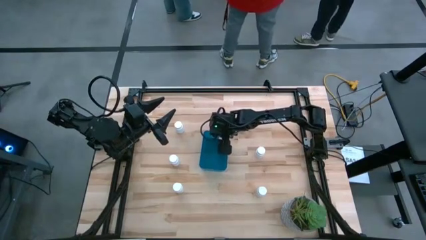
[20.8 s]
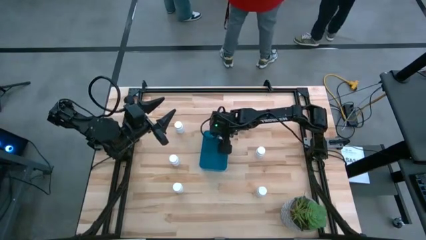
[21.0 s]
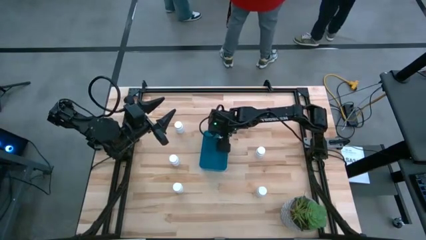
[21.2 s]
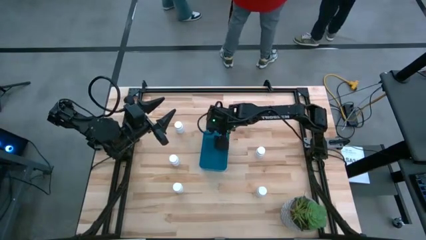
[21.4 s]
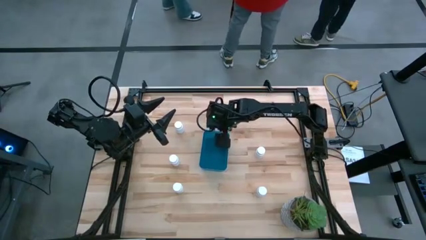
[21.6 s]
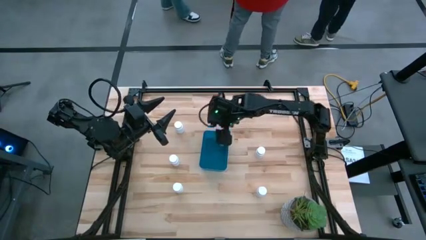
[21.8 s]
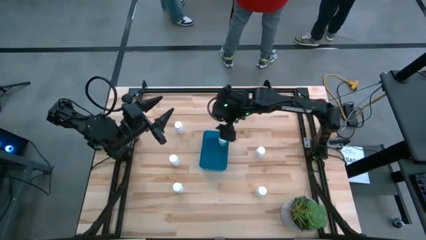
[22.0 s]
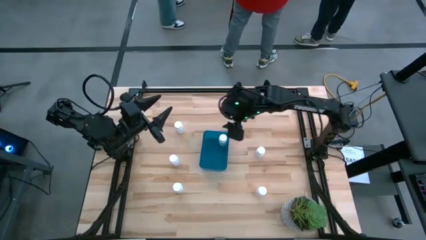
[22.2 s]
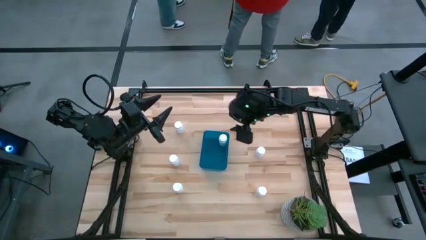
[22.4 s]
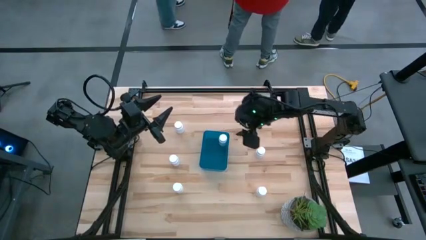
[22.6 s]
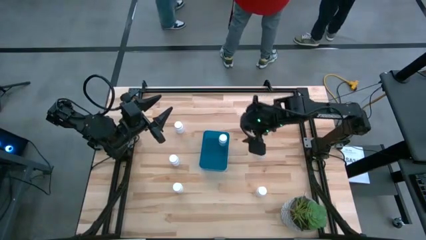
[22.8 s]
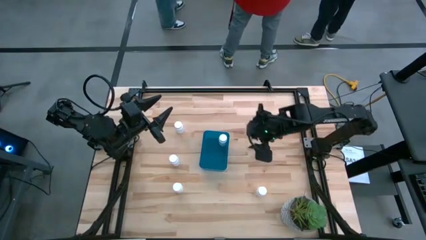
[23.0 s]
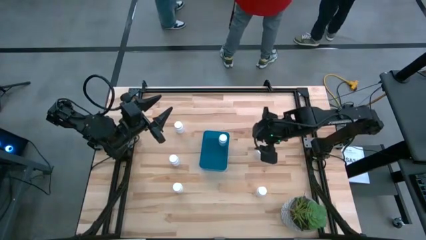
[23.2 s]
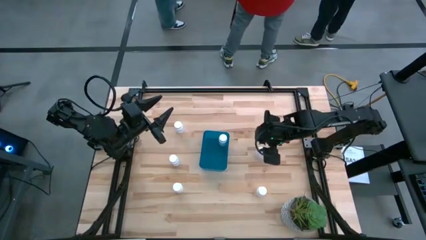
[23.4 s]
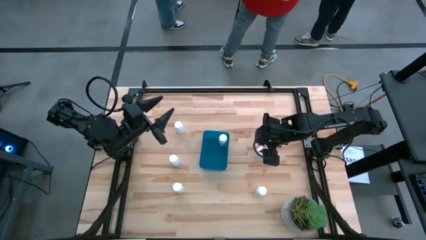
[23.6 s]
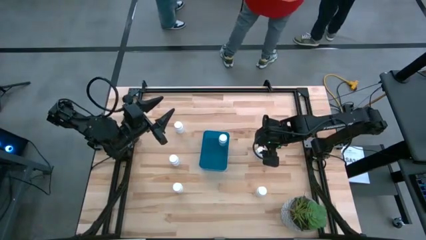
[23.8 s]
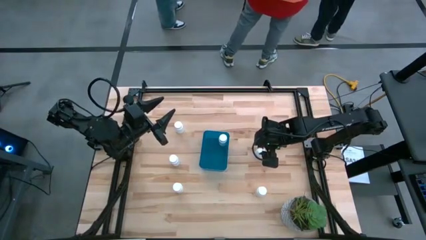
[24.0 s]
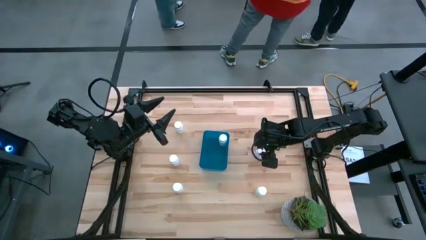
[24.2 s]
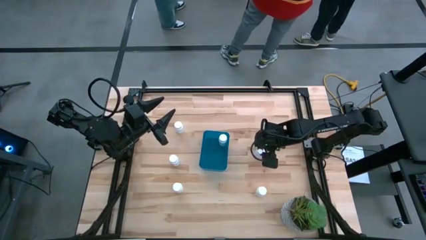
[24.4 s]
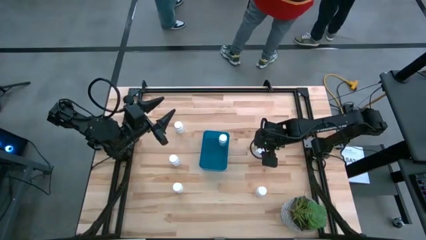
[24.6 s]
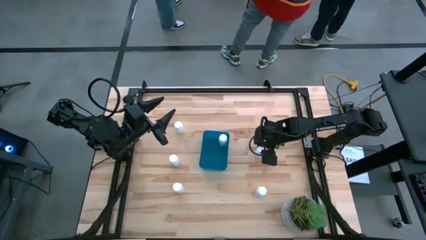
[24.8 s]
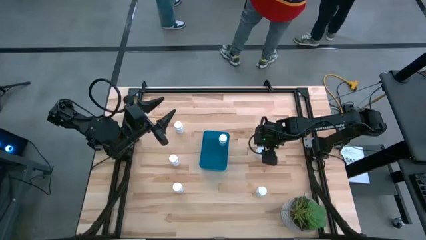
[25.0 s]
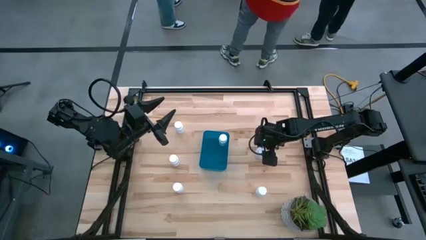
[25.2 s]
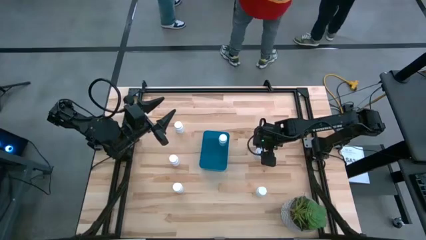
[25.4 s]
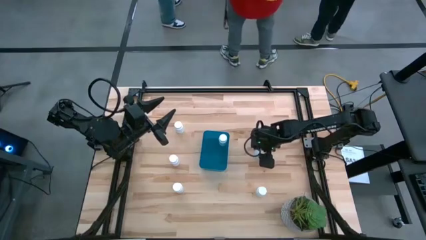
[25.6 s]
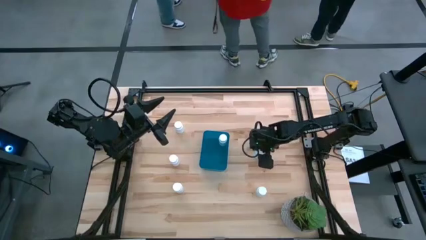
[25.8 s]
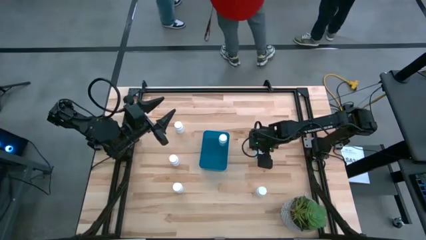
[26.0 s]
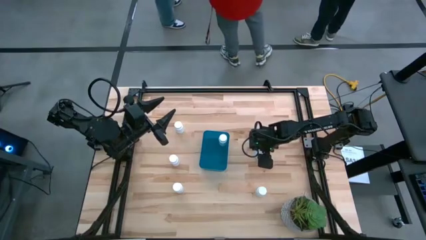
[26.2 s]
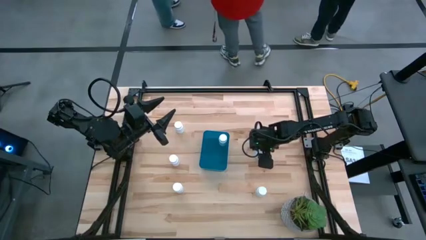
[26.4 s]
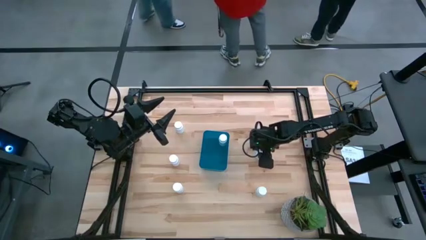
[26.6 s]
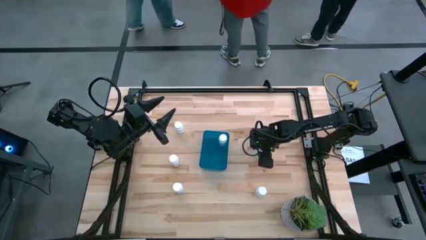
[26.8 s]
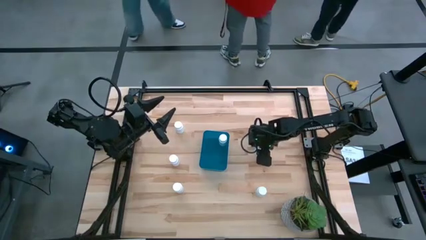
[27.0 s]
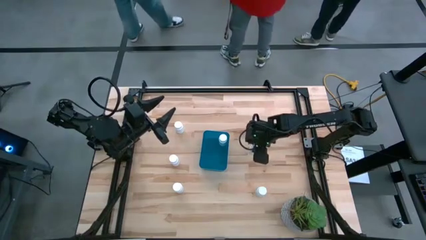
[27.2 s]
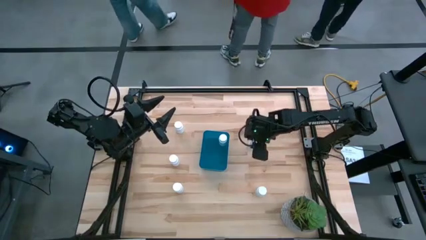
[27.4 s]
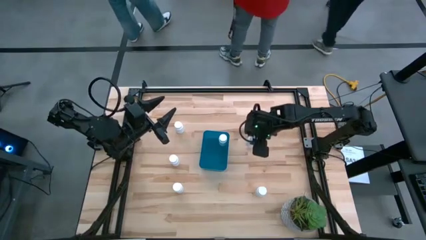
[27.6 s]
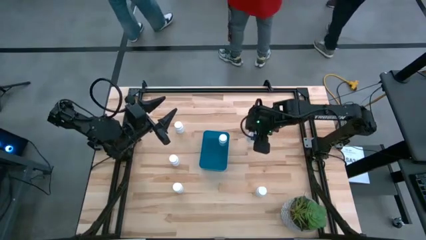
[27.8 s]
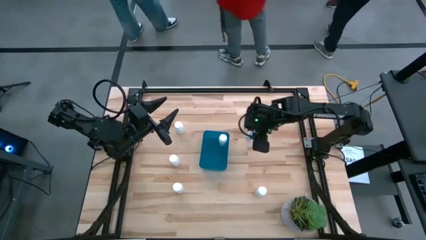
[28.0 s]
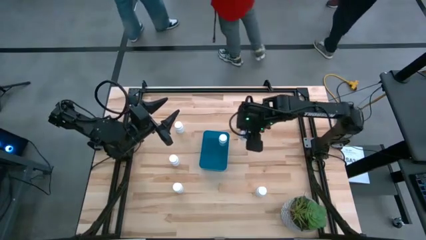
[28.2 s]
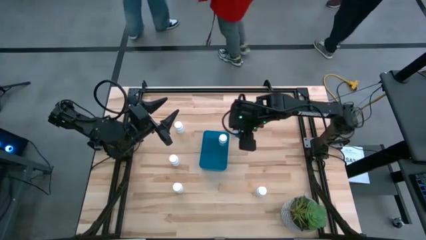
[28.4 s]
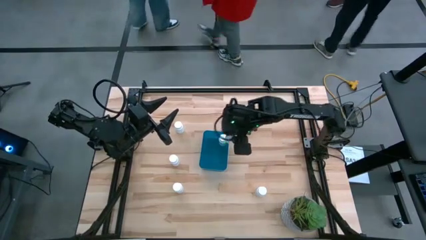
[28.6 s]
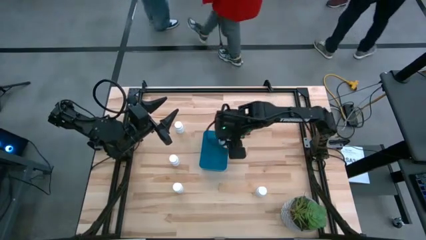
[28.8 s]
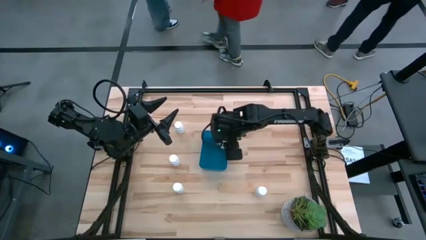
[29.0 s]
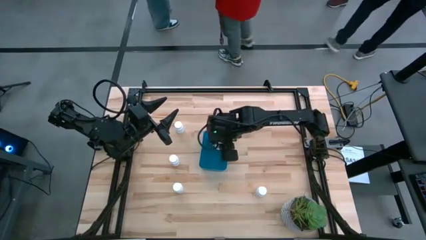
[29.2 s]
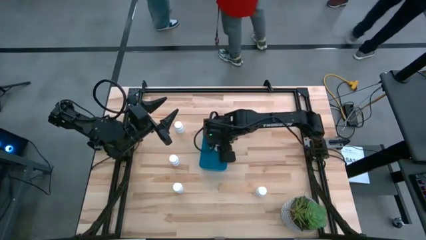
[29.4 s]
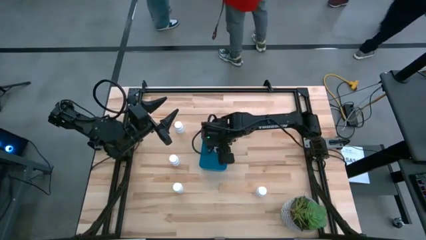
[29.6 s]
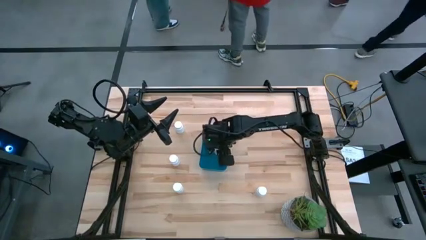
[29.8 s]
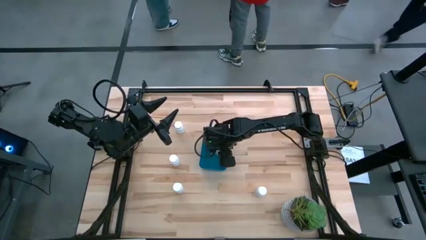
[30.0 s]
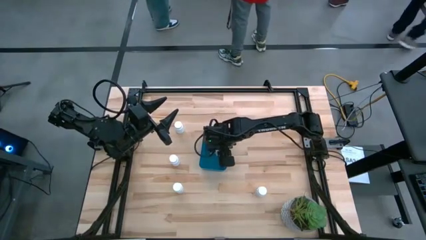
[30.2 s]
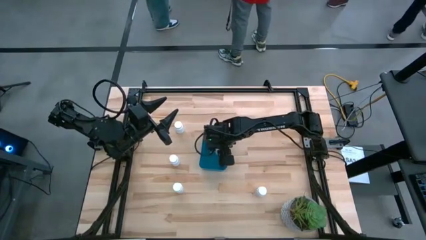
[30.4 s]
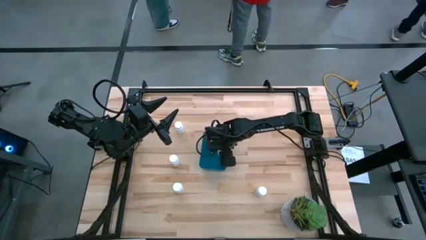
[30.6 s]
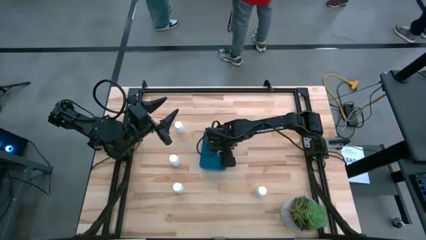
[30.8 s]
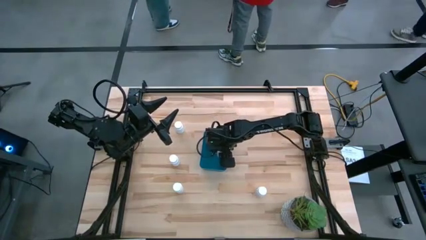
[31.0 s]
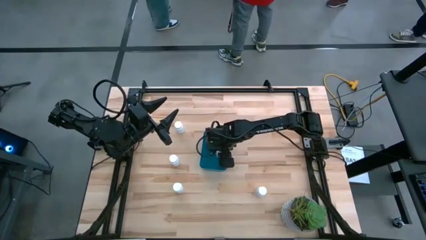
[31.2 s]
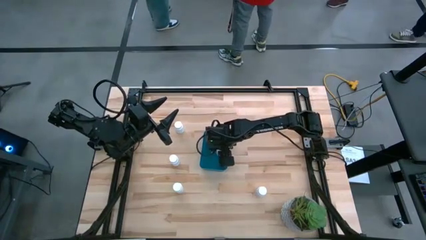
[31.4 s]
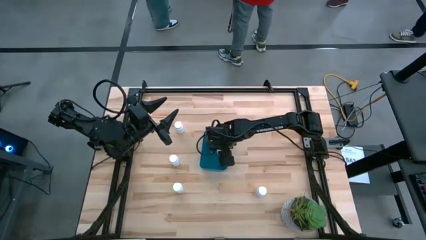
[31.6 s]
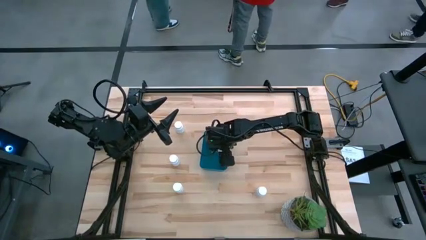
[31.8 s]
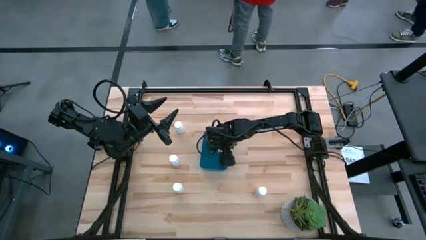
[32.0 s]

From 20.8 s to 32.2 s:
Task: Pick and place pill bottles into a basket
Put the white medicine bottle into the container

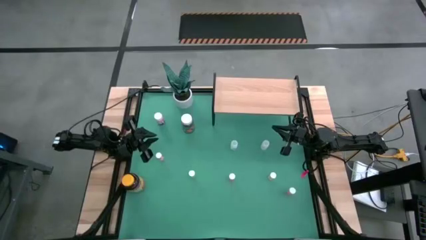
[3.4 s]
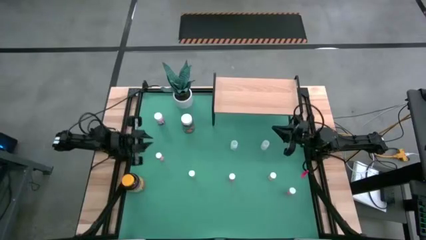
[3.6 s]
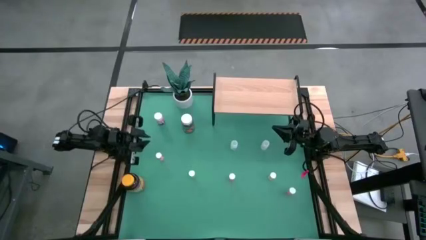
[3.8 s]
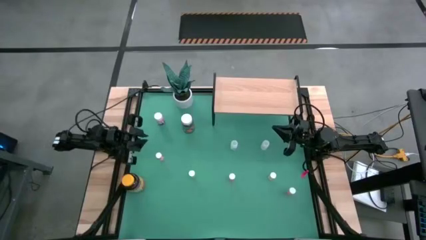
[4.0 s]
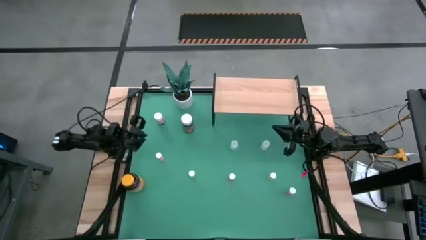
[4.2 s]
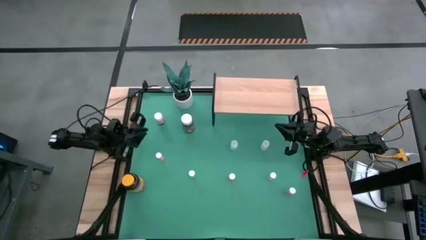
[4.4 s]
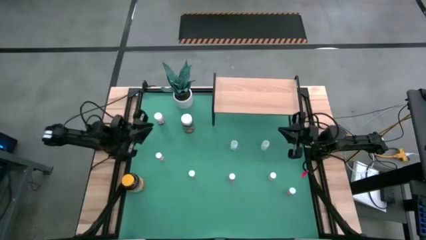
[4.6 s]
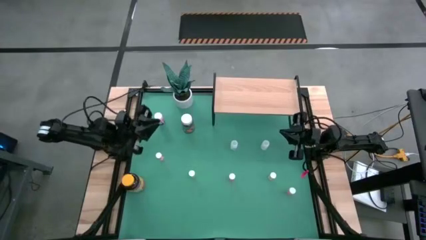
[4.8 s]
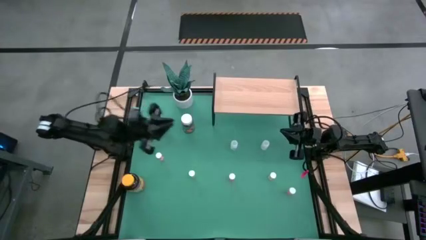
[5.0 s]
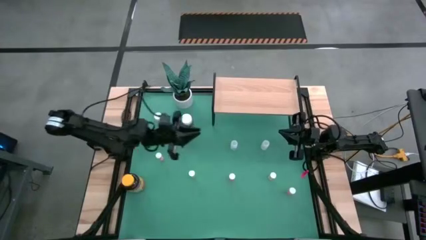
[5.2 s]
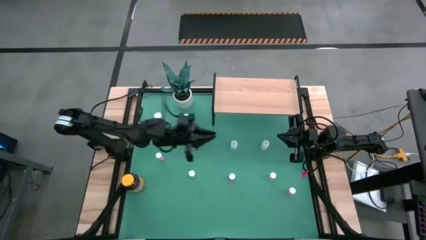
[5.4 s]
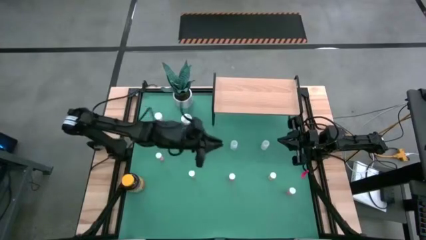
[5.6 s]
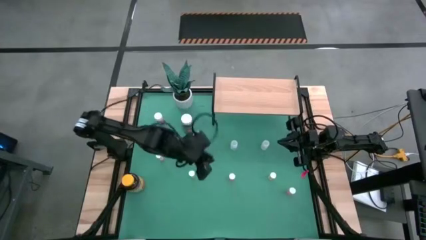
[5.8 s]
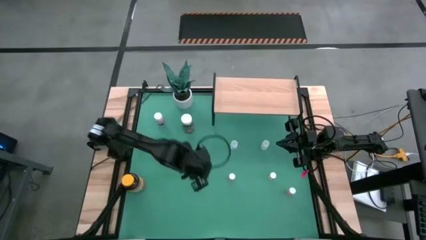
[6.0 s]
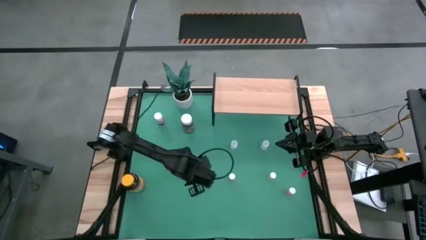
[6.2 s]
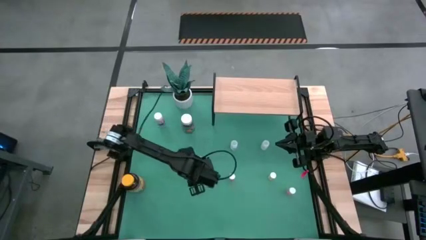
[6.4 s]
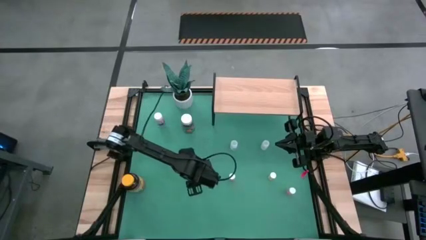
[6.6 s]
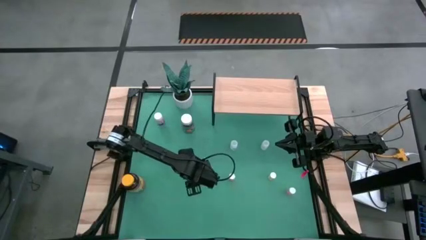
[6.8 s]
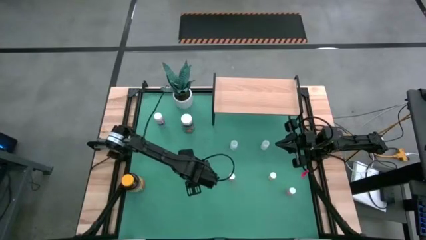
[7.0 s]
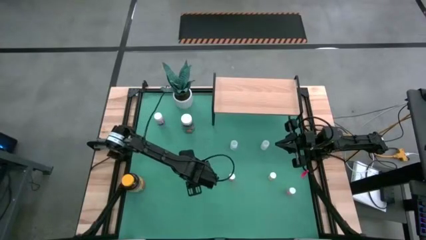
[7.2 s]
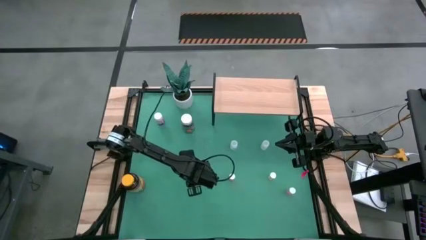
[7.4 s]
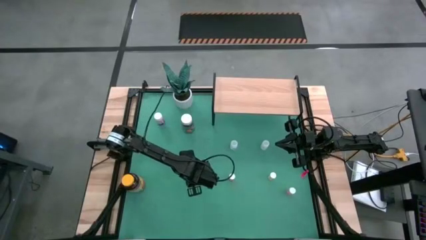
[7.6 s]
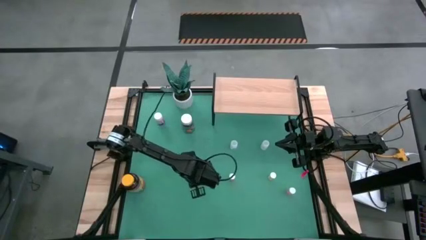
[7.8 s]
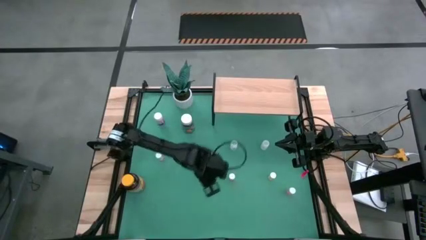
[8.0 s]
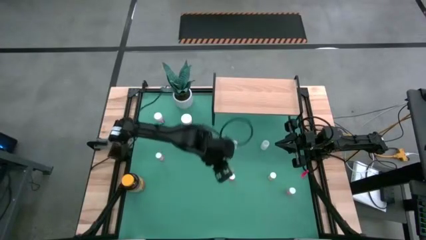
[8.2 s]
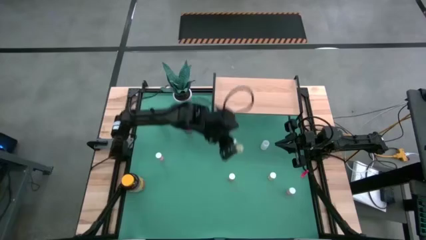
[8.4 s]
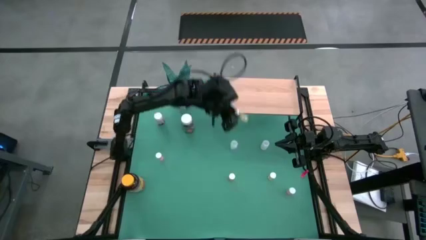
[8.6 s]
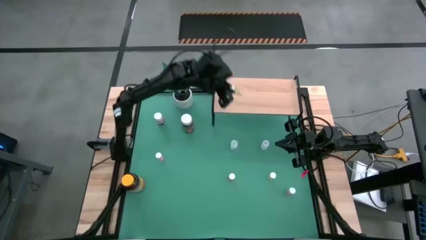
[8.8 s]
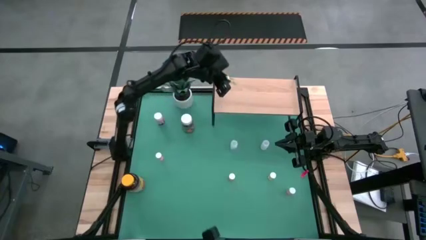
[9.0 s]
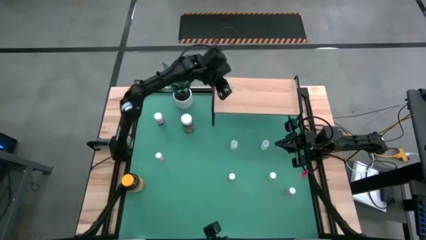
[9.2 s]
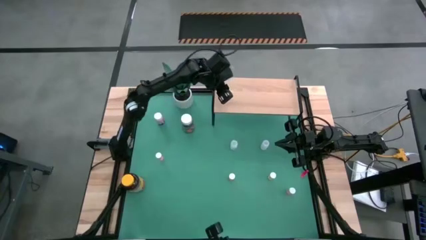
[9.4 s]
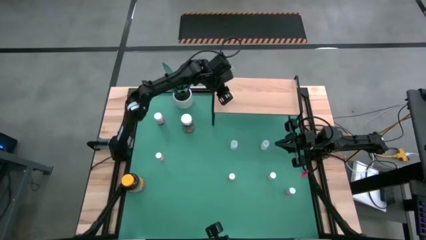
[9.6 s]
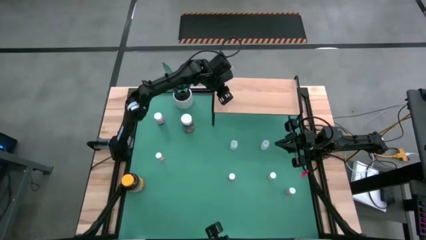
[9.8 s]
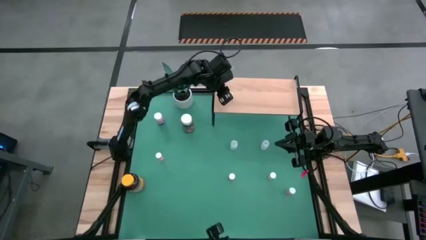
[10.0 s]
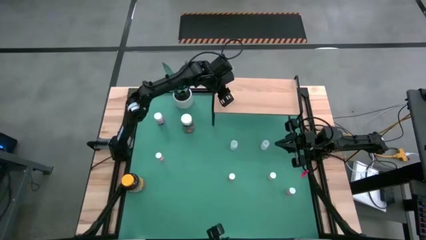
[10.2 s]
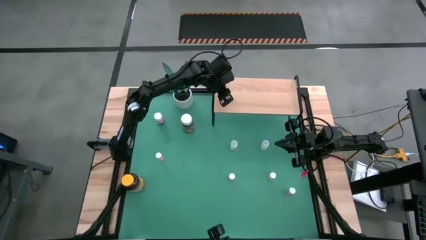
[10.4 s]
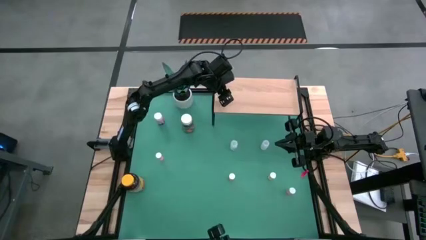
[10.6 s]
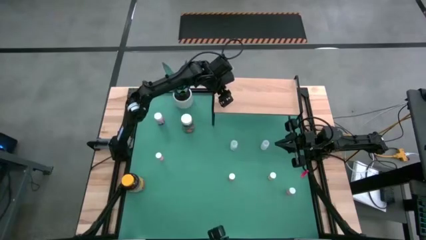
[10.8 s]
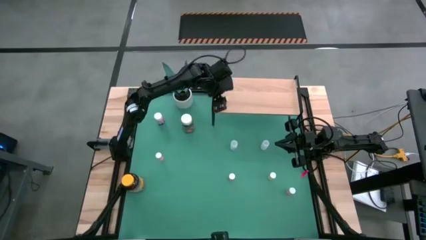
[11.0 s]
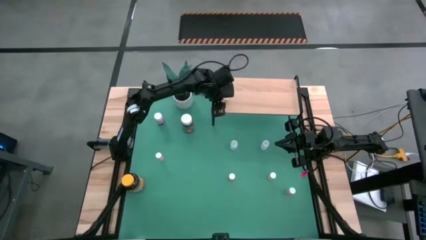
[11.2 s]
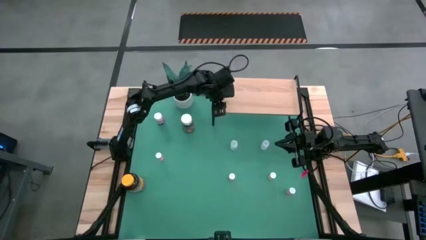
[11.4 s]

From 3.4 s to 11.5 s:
Task: Pick and place medicine bottles onto shelf by color
Put the left yellow pill bottle on the shelf
